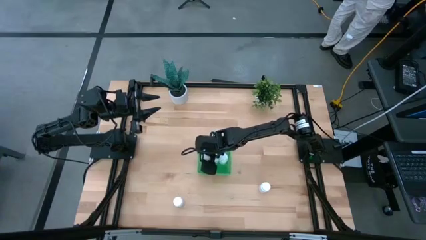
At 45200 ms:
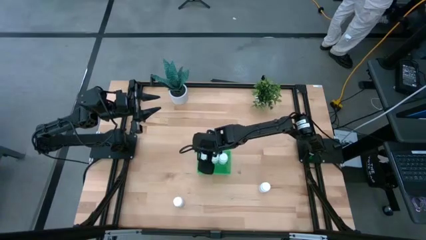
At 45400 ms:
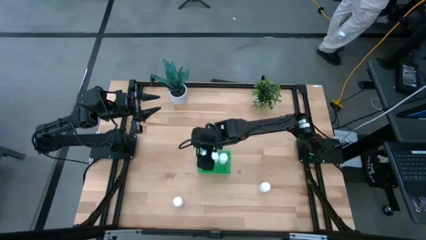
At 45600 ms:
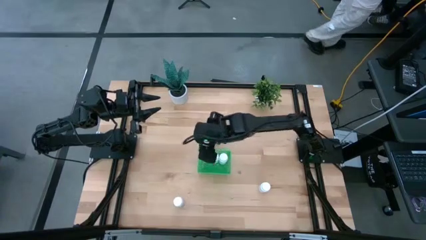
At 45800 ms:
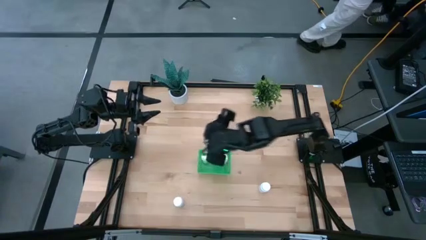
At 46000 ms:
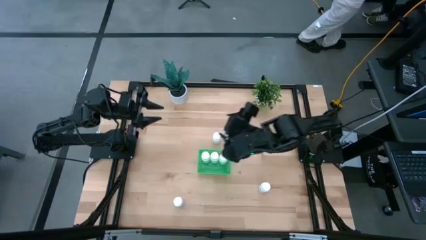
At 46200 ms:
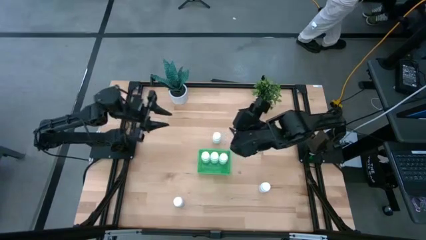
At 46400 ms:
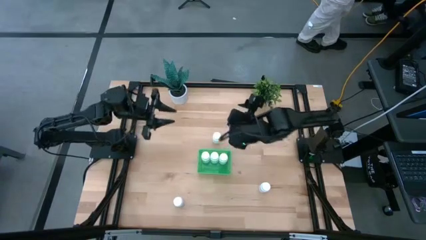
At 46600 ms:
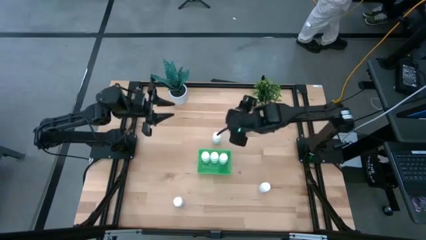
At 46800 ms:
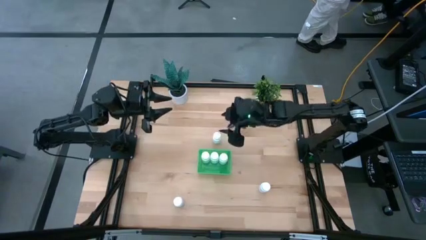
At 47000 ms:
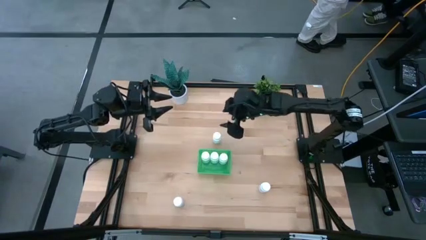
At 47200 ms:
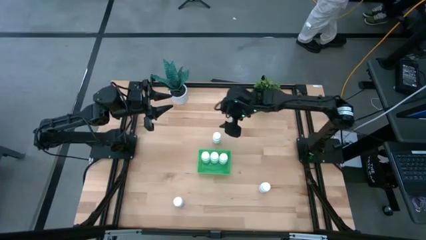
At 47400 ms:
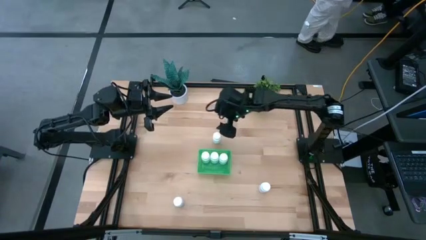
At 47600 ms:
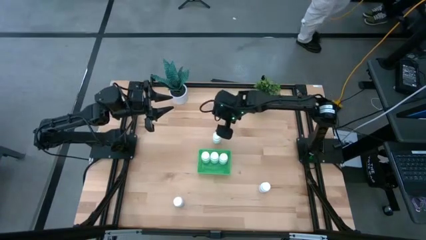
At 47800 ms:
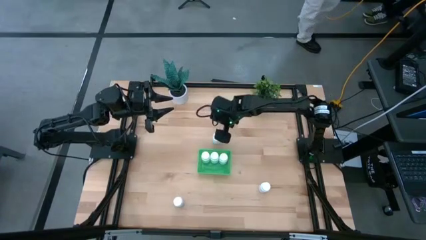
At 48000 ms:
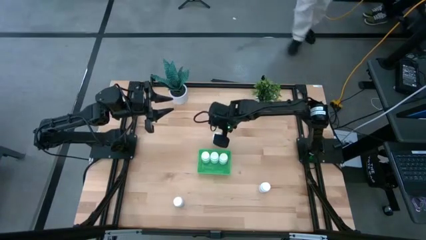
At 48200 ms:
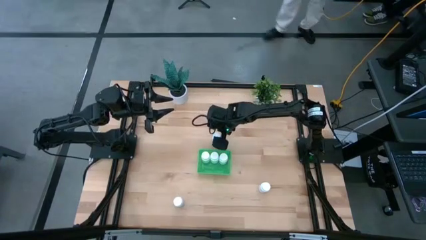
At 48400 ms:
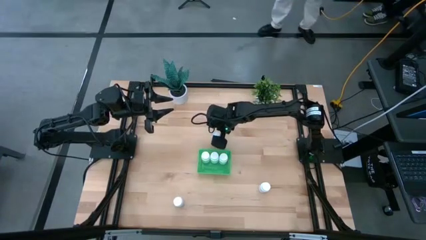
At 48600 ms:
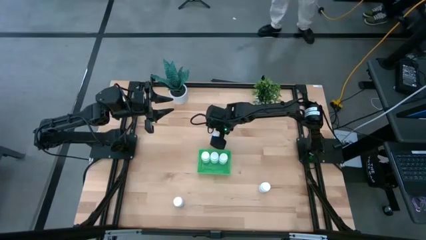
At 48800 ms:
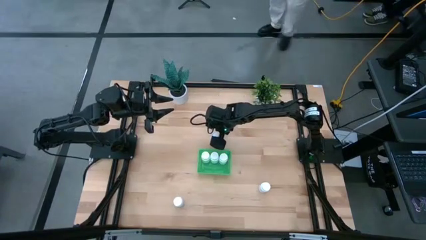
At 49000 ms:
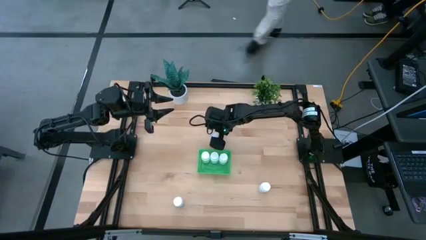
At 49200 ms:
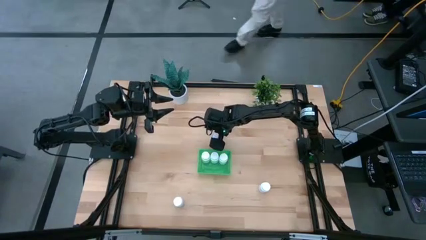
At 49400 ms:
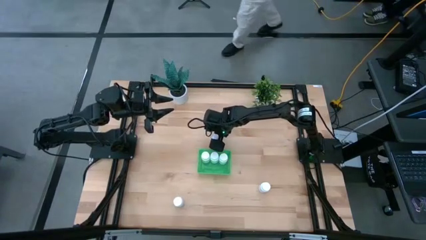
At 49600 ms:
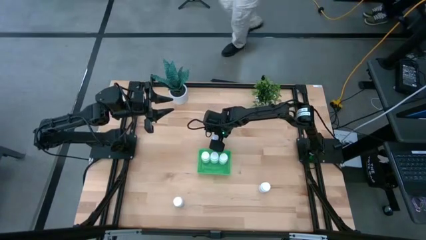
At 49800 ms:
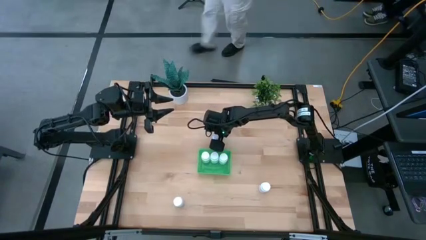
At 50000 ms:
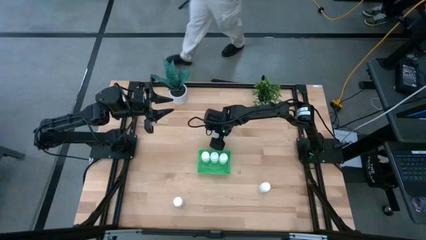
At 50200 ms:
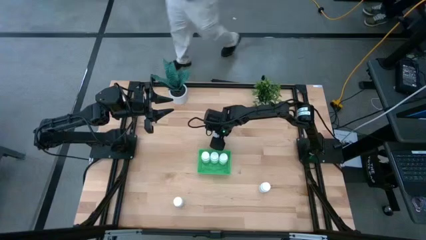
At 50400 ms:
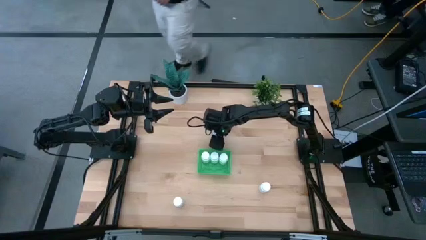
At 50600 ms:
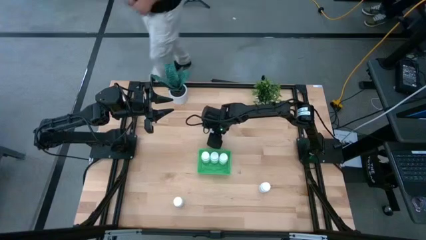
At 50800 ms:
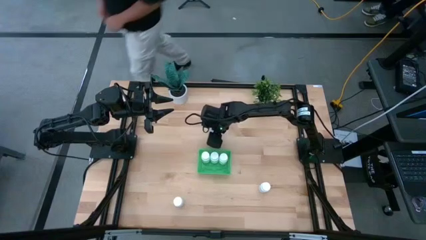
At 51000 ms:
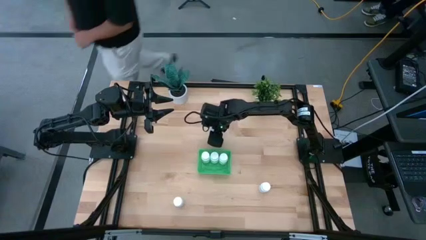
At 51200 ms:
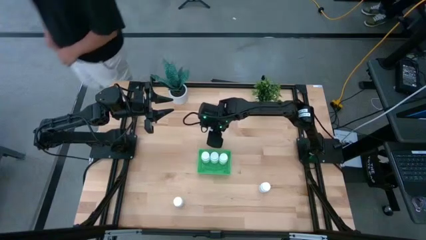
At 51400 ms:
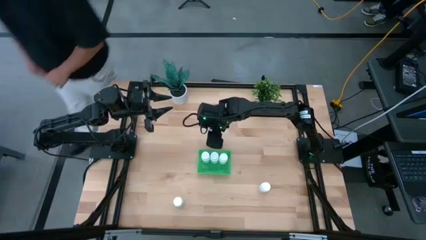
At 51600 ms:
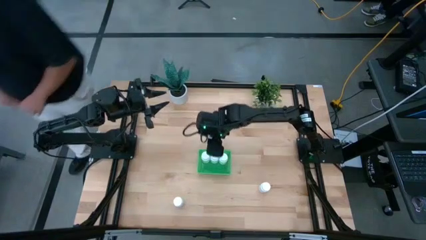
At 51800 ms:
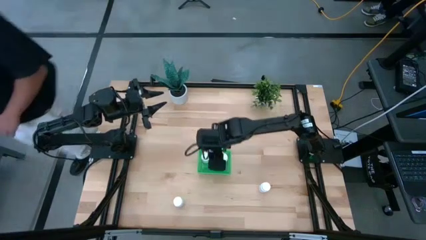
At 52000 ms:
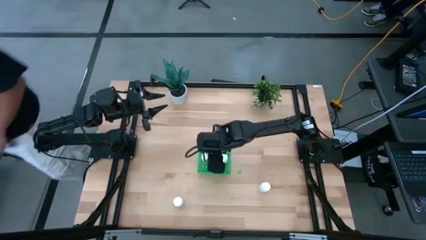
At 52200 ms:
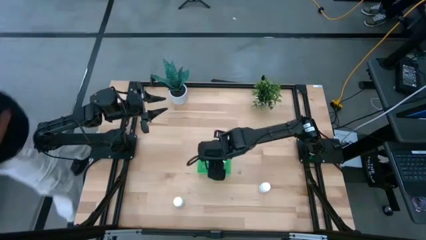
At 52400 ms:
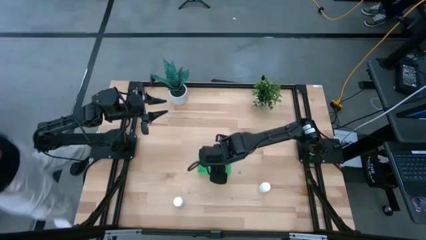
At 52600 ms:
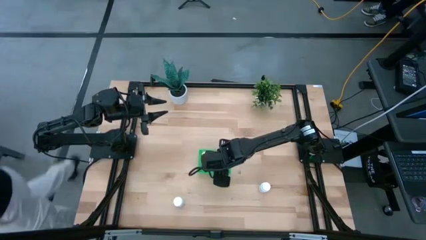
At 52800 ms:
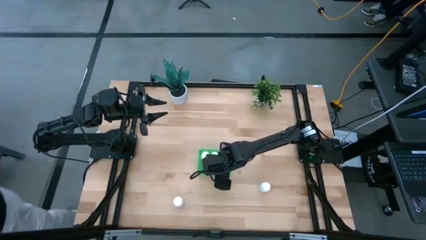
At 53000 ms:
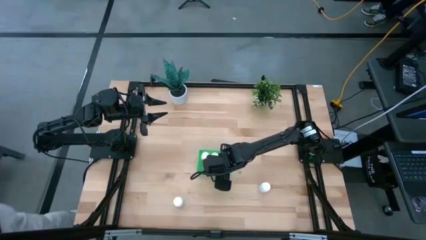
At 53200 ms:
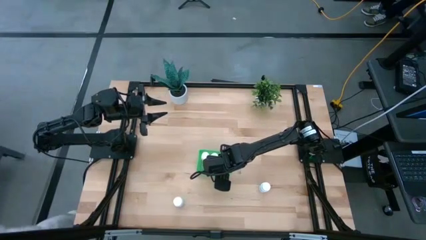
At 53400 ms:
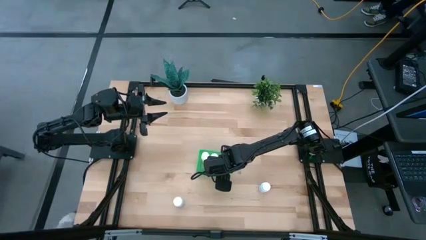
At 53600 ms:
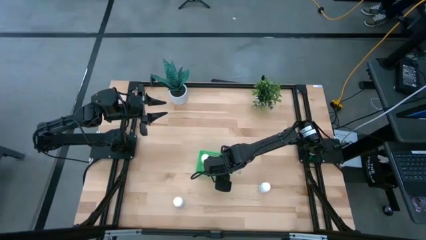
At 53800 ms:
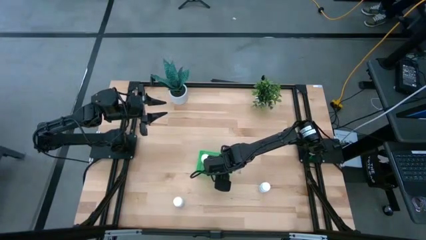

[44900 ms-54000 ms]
Task: Pick and place pill bottles into a basket
Put the white medicine bottle into the green basket

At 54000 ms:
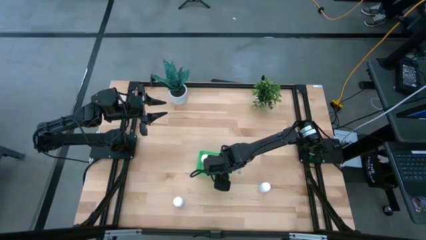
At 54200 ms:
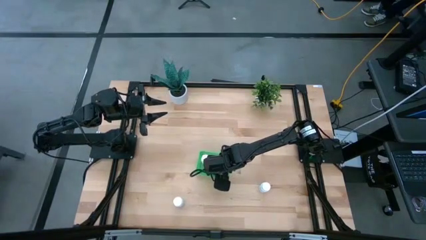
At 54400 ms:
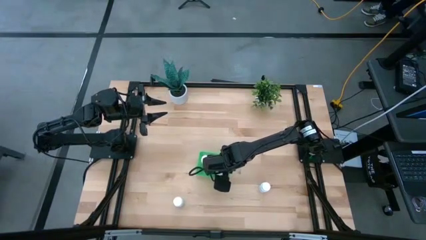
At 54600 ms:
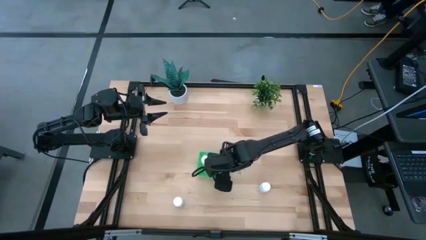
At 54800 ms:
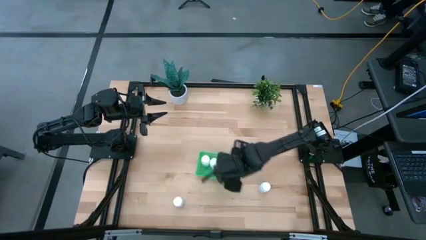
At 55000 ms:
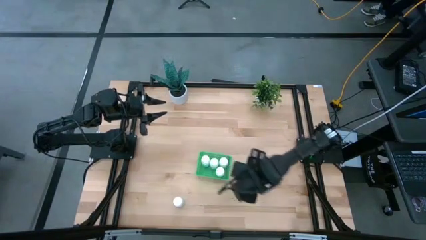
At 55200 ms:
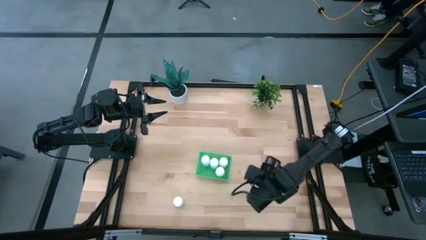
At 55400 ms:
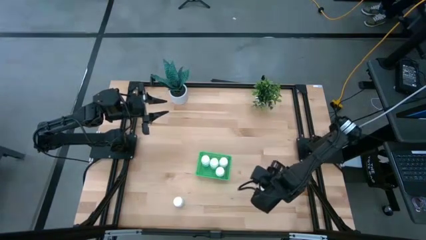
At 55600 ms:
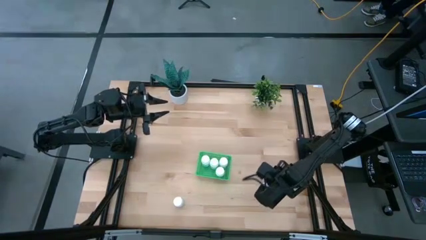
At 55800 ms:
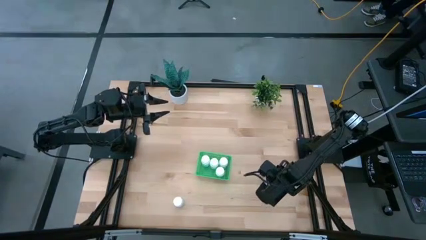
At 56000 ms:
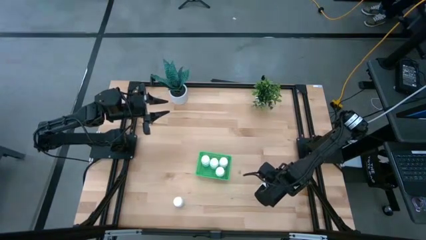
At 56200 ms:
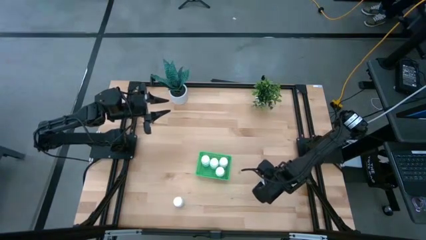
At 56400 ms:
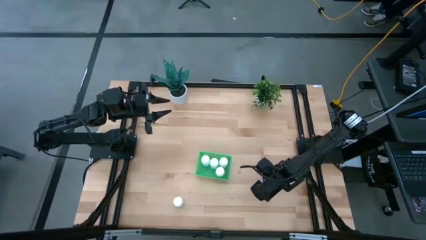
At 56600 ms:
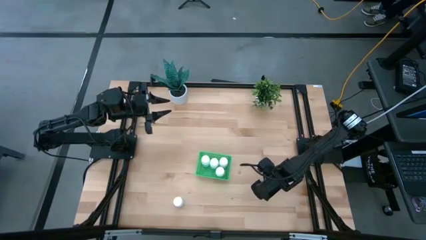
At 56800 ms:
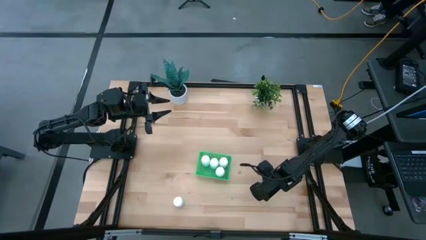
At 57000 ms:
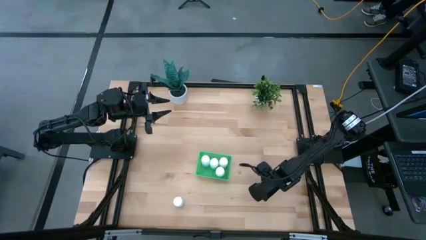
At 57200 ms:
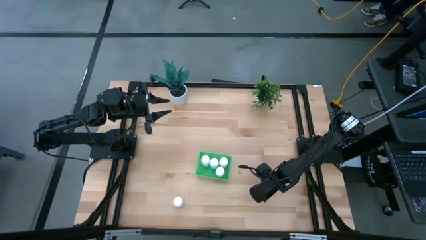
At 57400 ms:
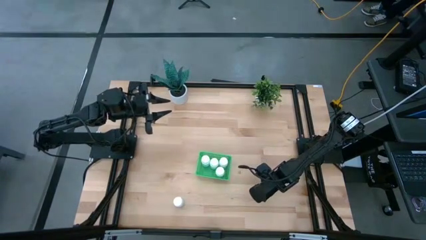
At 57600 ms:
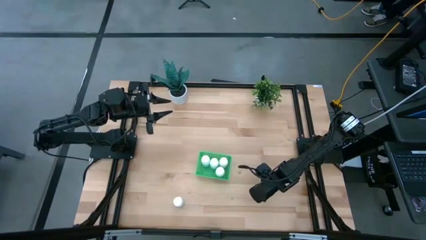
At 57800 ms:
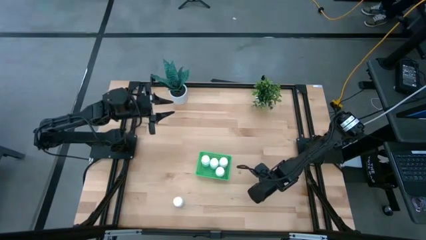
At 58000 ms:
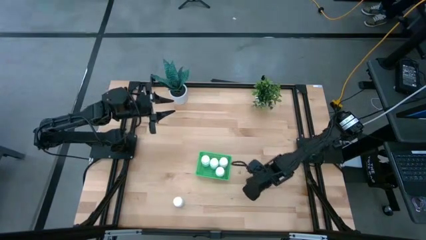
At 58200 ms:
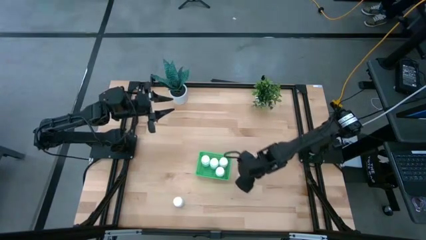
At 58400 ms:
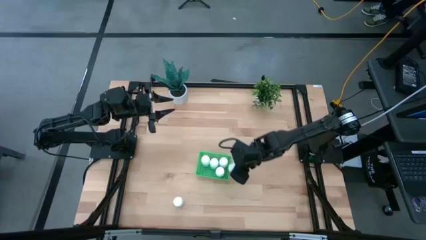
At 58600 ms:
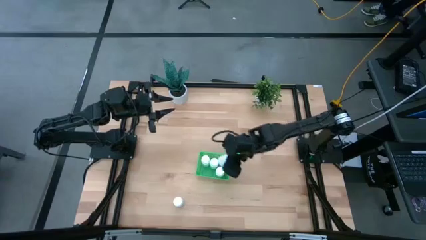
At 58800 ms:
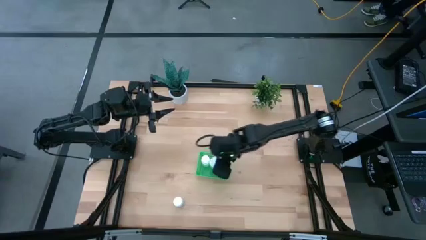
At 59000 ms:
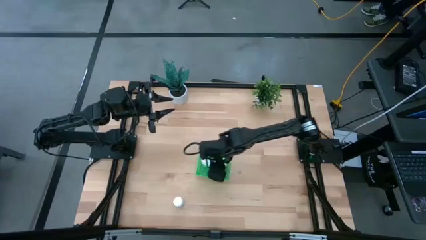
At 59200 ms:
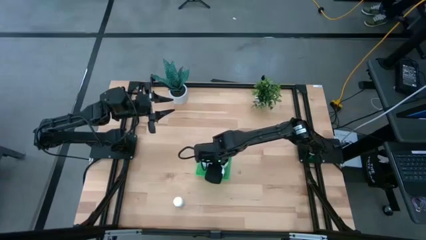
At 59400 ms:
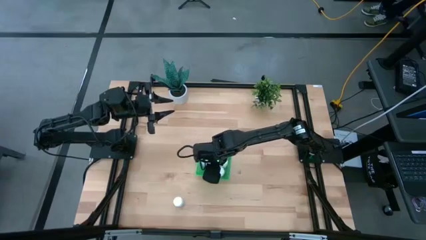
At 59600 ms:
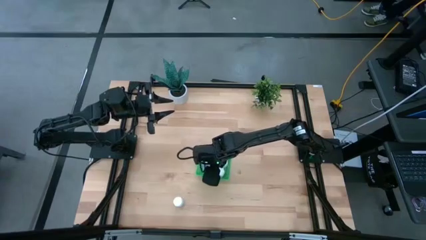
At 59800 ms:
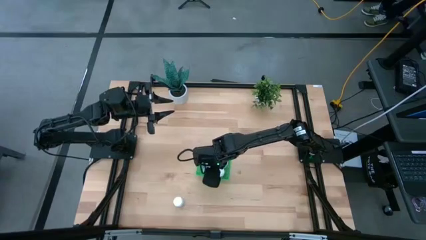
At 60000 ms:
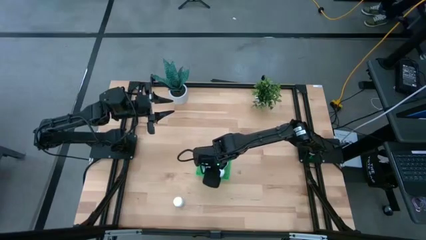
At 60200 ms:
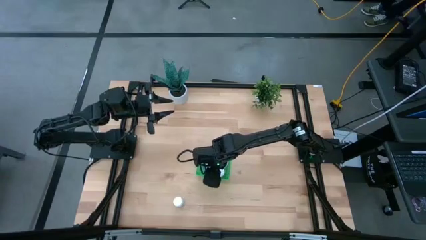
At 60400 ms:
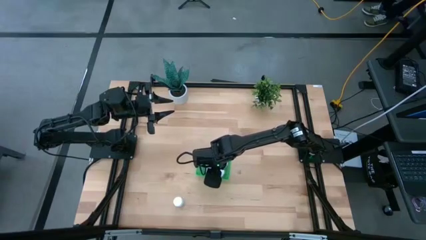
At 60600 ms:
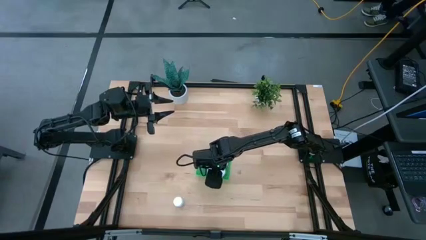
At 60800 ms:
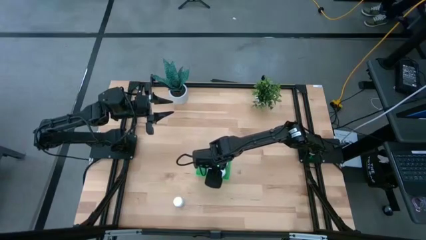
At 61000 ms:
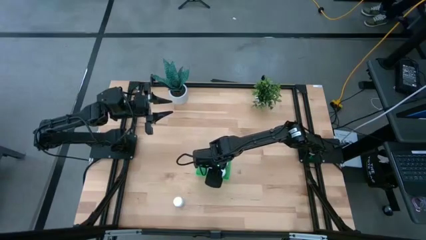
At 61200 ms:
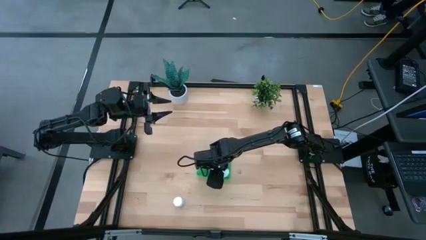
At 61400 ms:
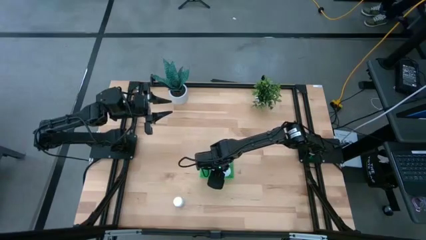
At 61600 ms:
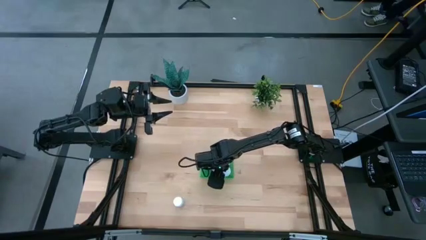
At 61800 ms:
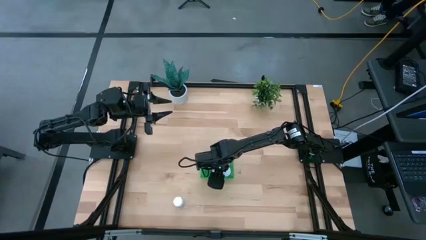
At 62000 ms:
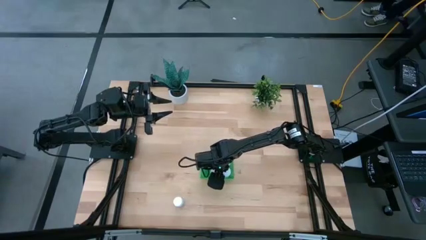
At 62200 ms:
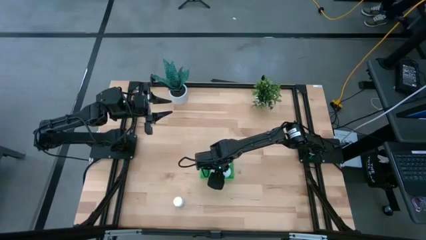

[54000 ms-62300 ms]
Put the white medicine bottle into the green basket
